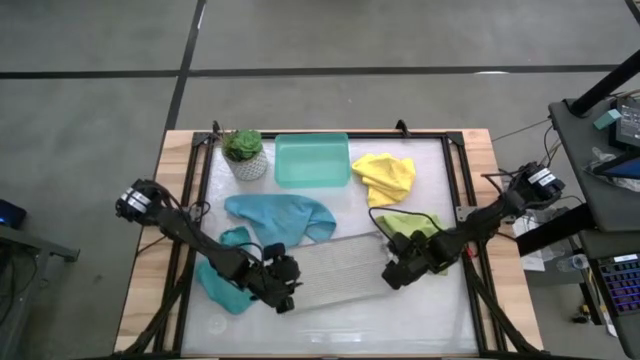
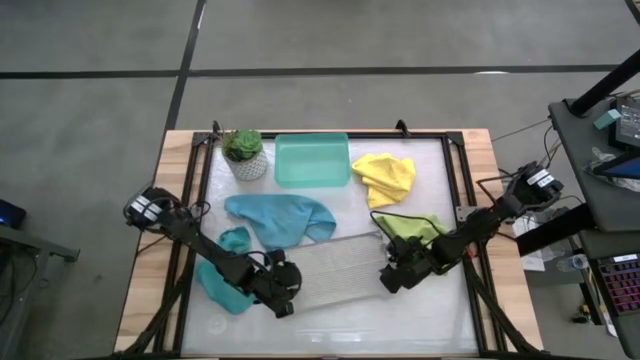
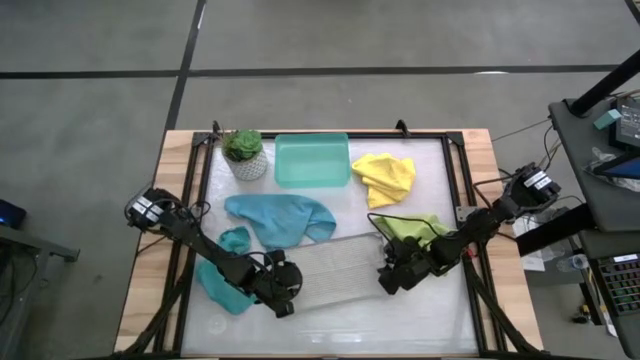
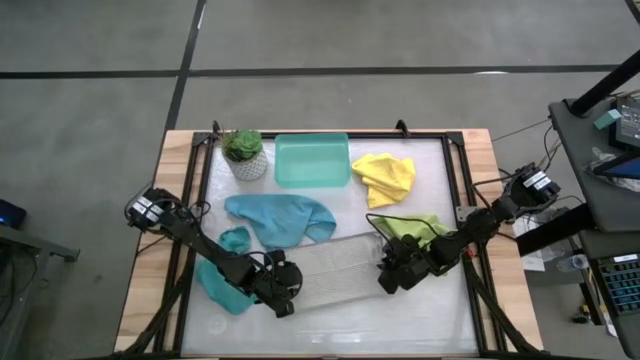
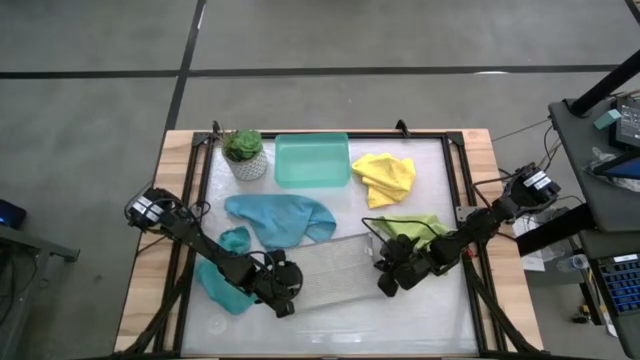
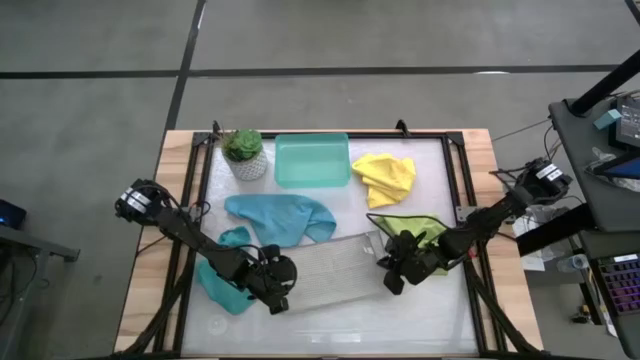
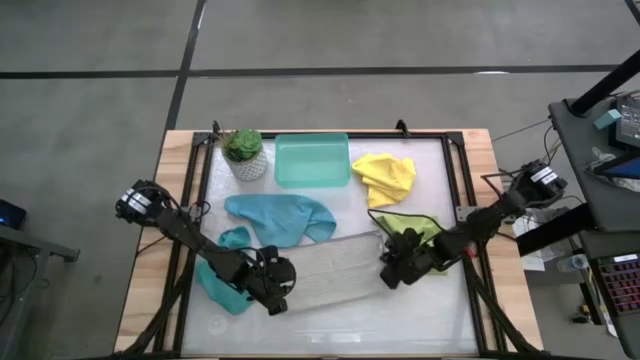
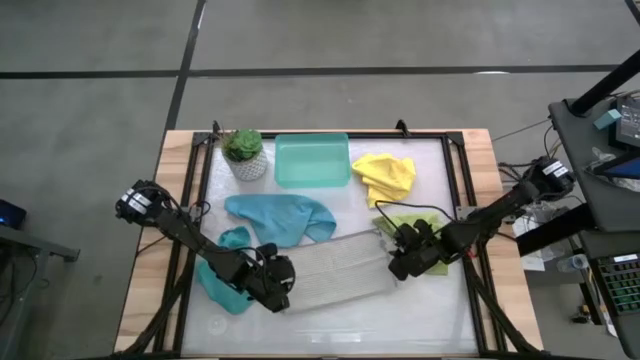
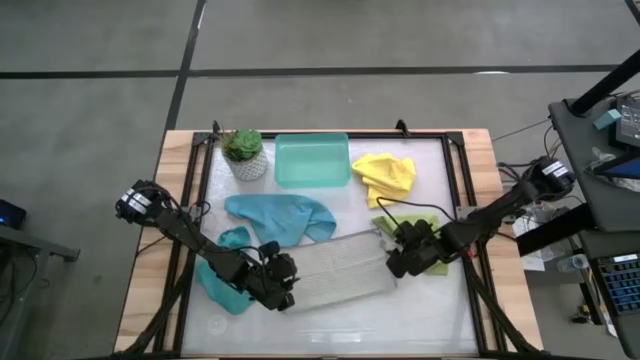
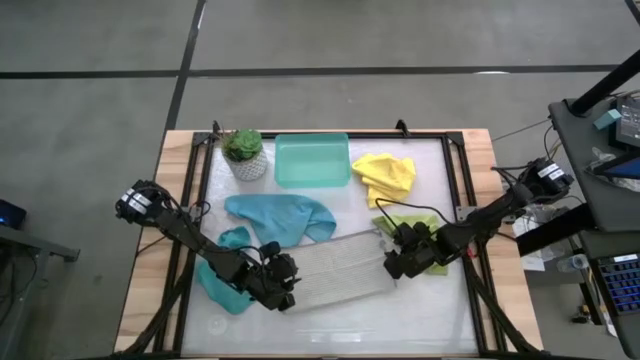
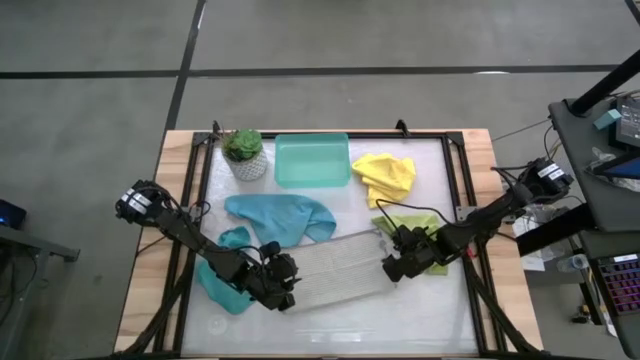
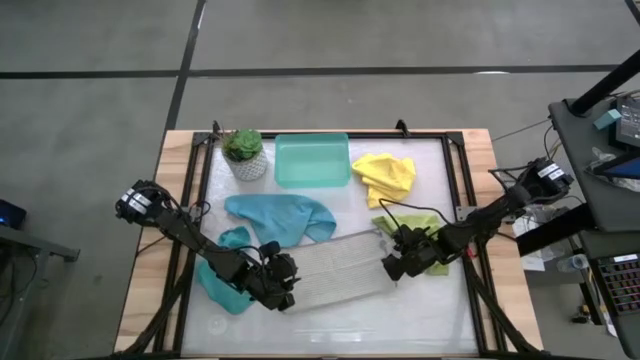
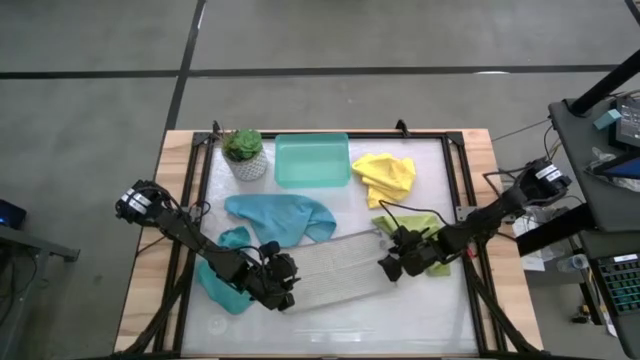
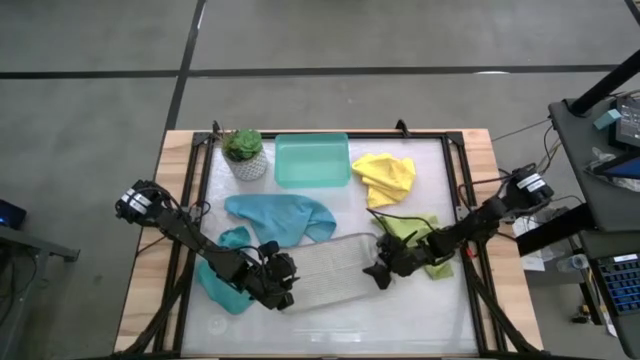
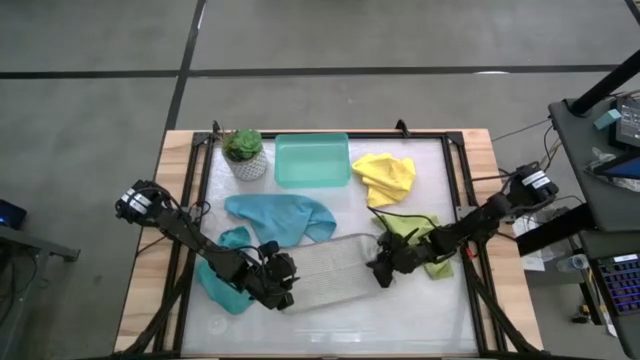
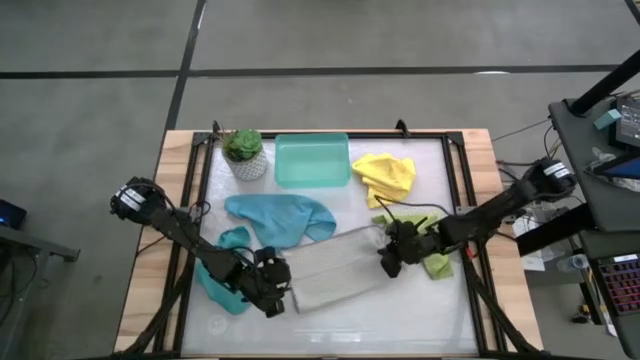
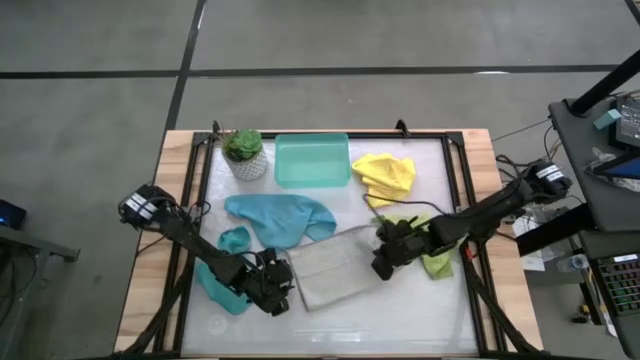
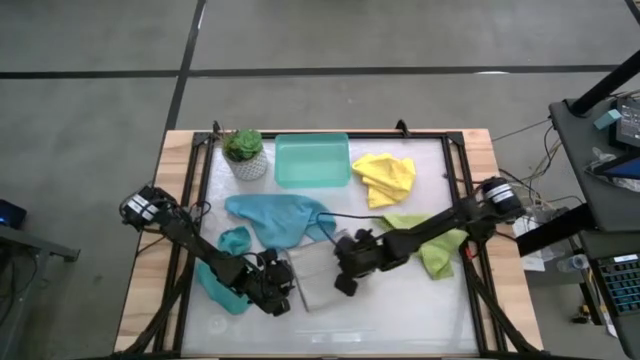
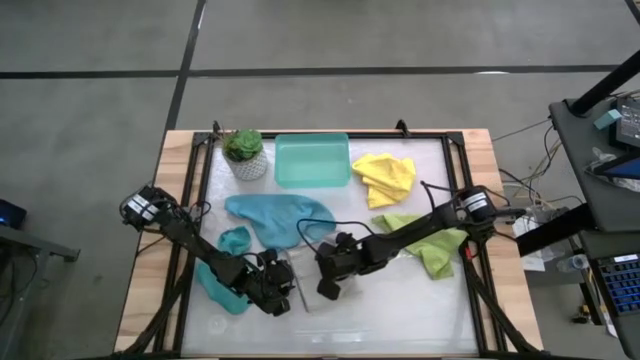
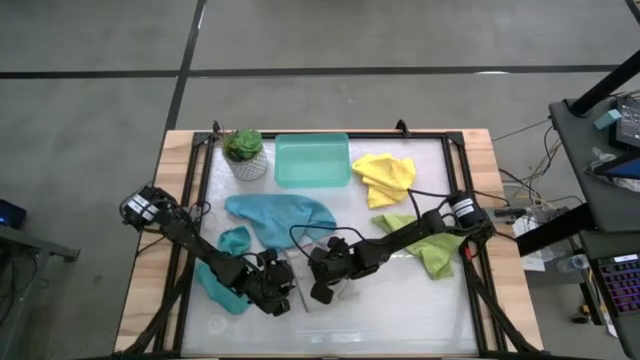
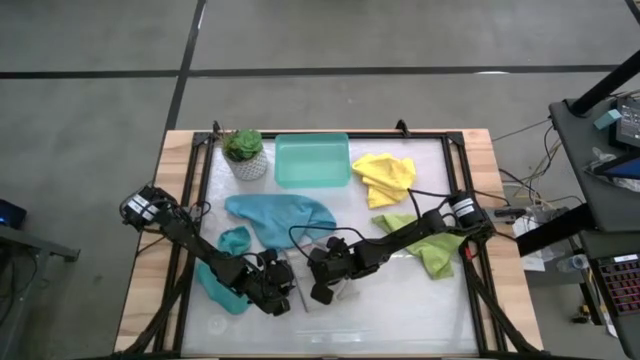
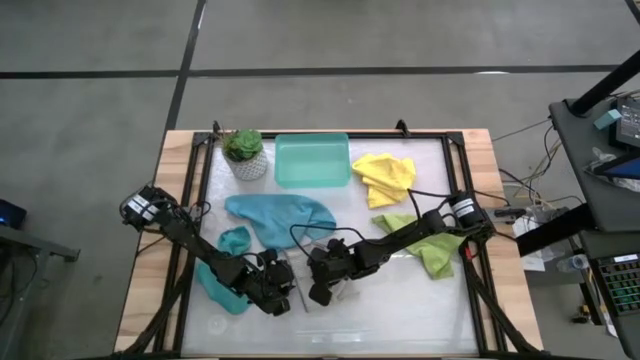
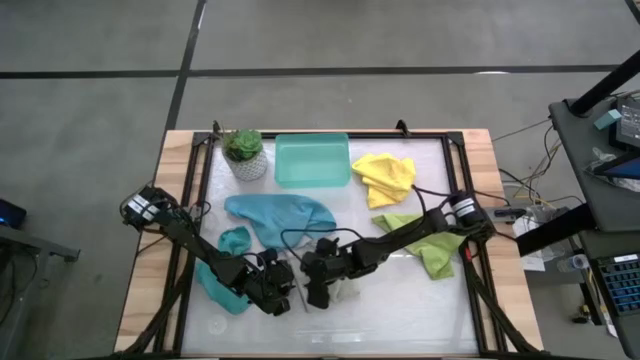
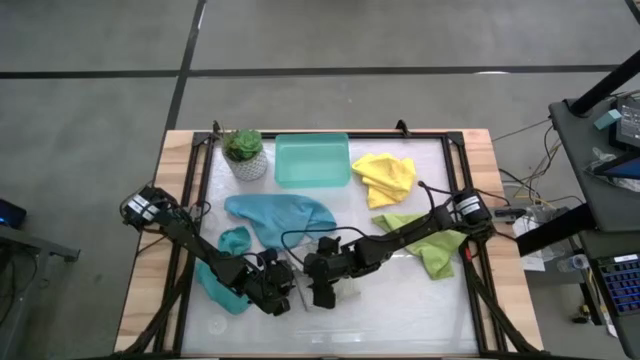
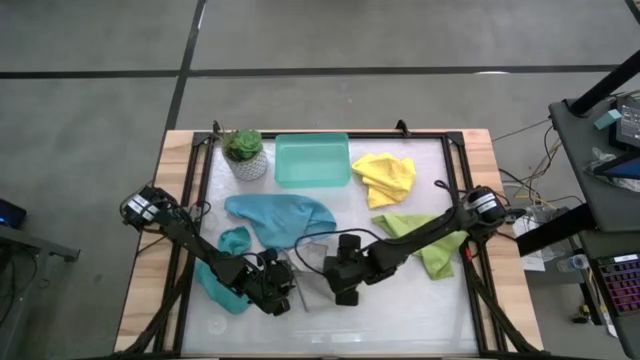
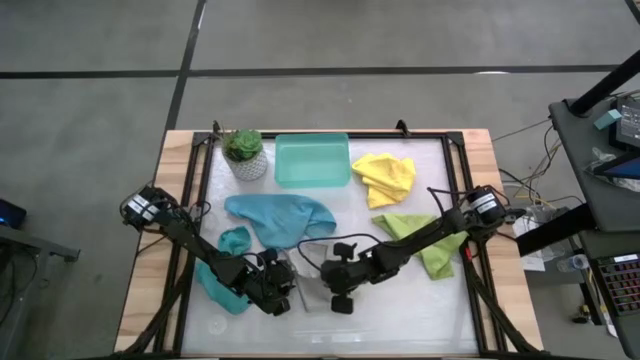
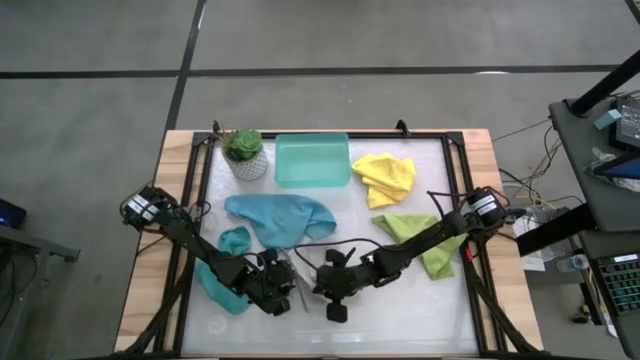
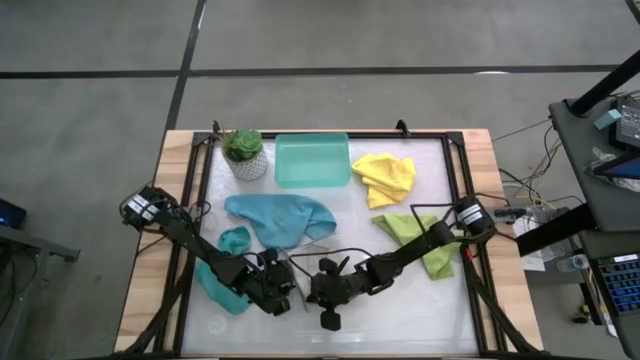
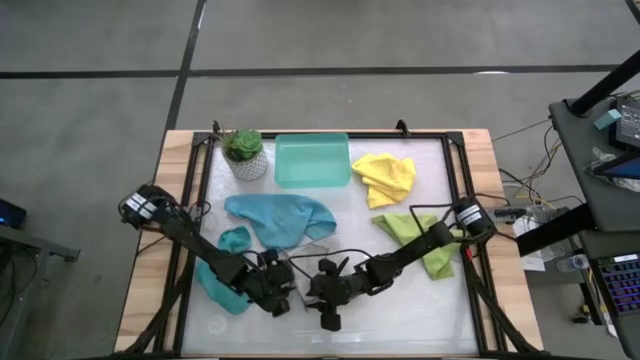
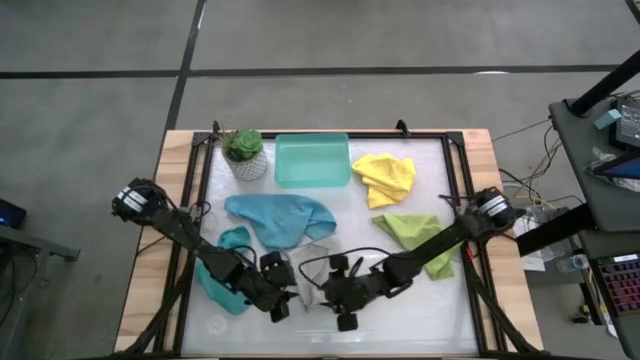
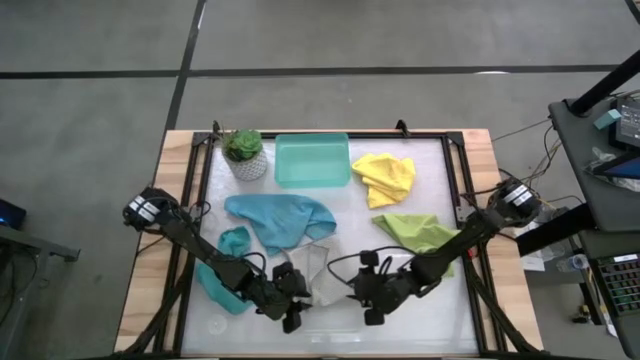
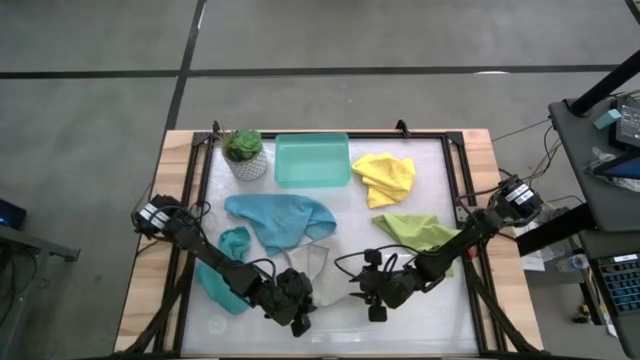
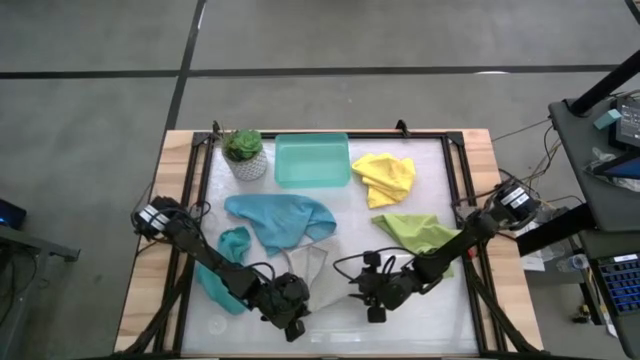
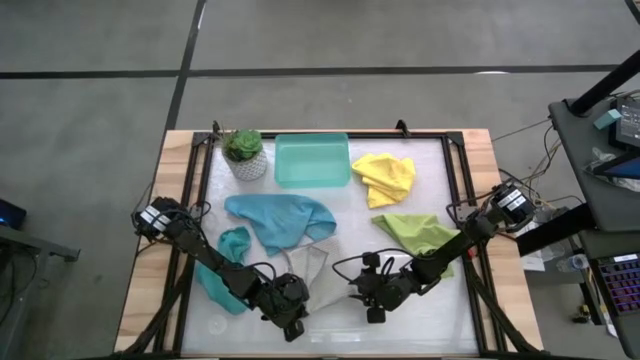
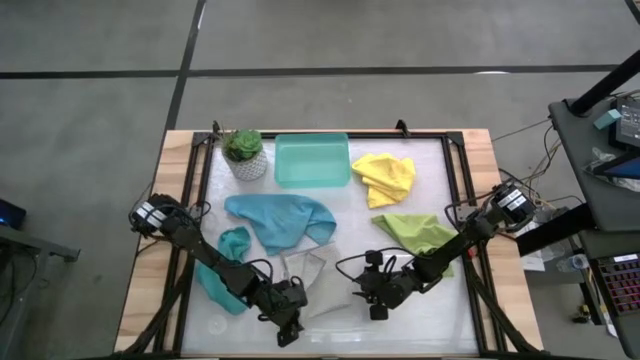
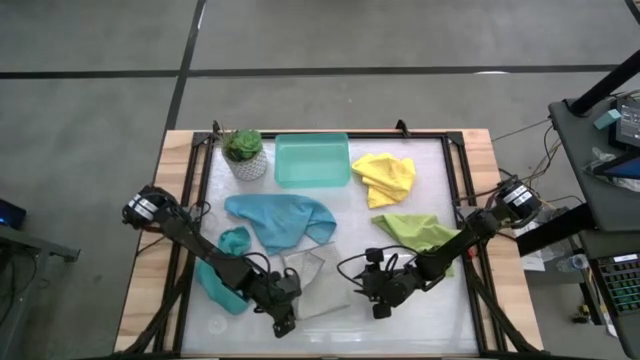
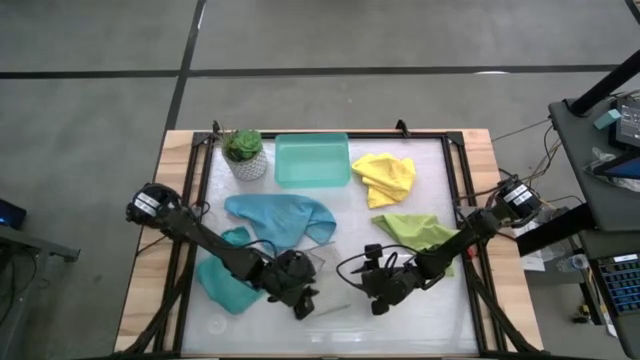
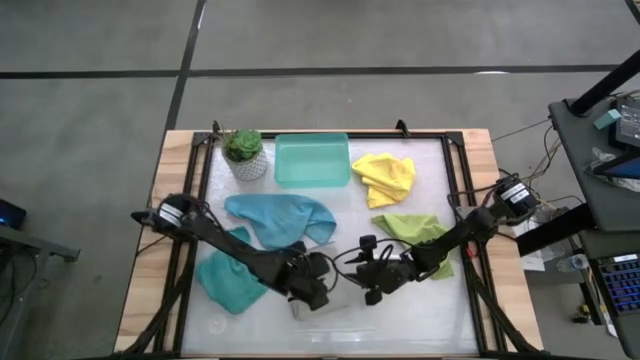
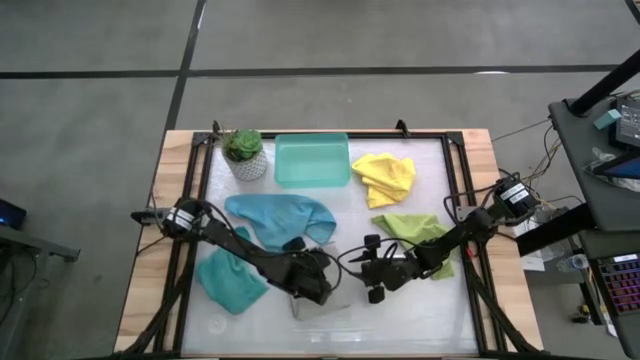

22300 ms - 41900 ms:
Task: Fold microfiber towels
Fold the gray microfiber cloth

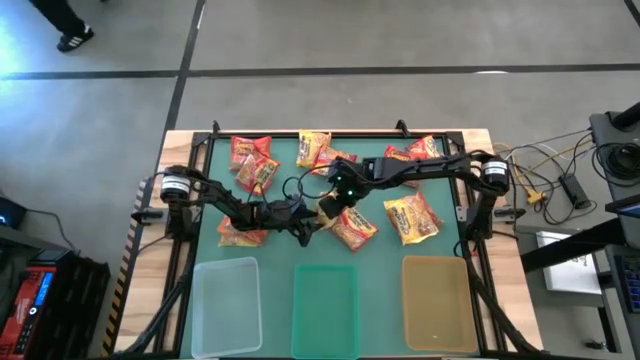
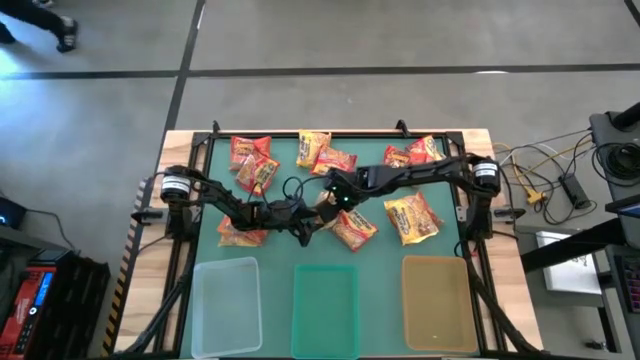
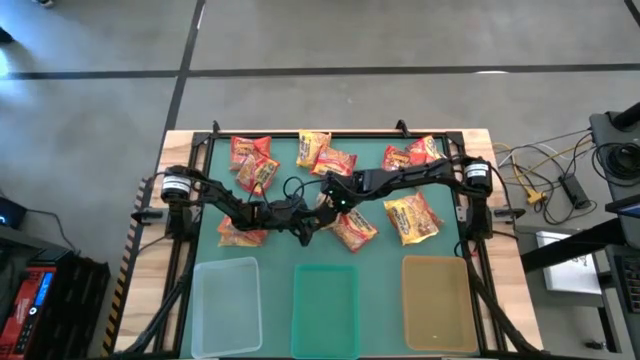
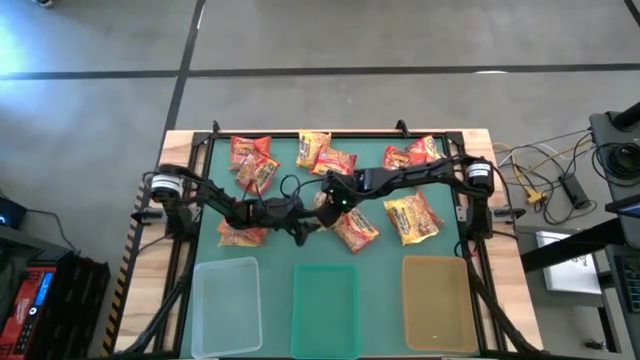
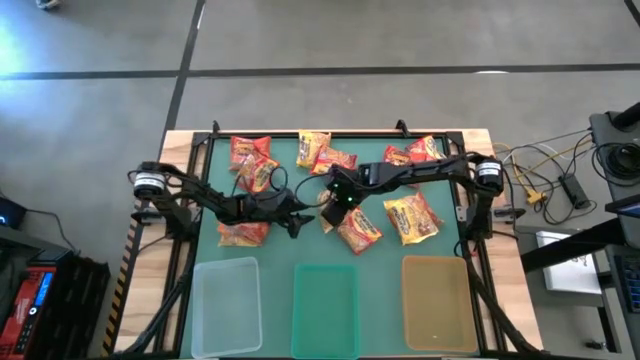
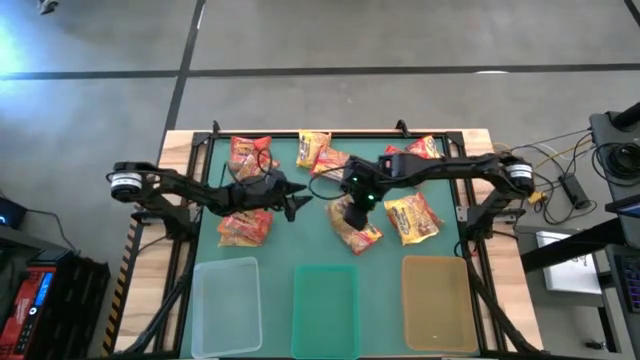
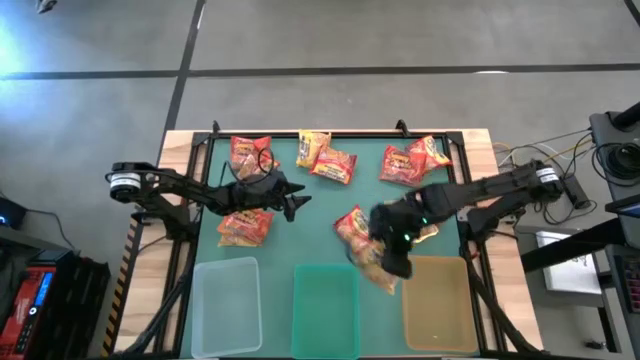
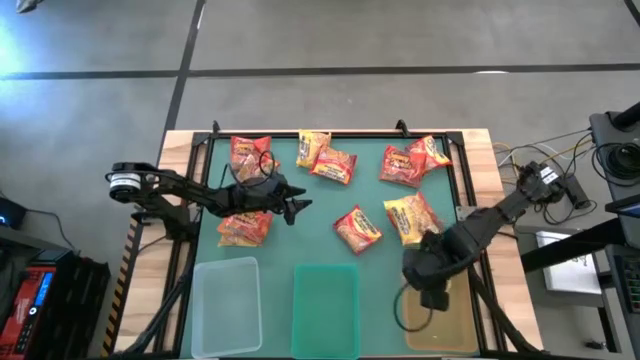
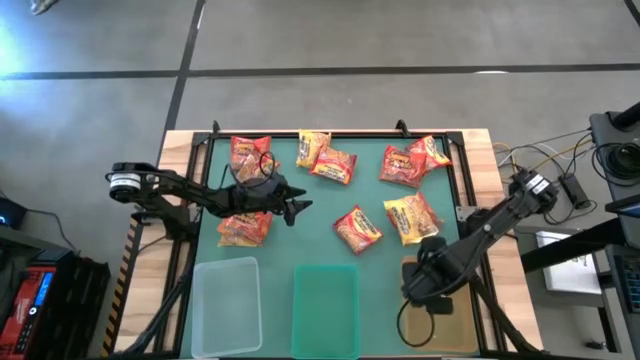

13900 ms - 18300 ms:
Task: Sort Maruchan noodles
Put the yellow noodle pack into the orange bin
